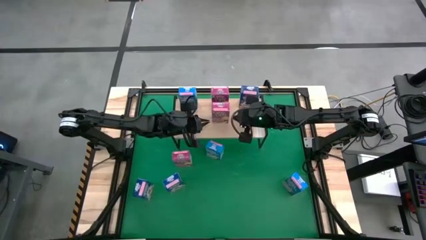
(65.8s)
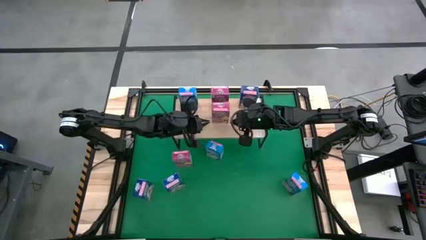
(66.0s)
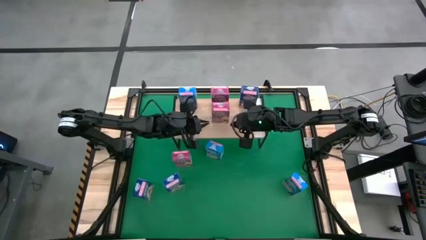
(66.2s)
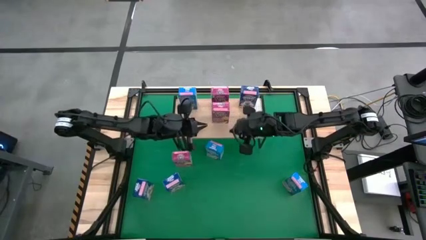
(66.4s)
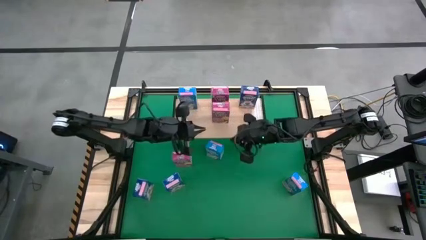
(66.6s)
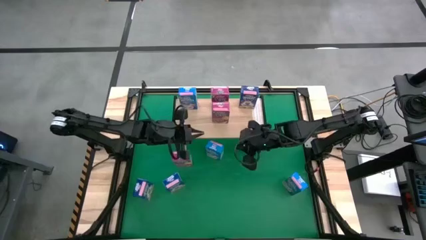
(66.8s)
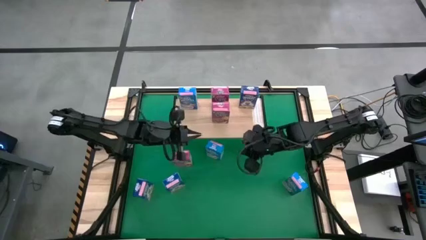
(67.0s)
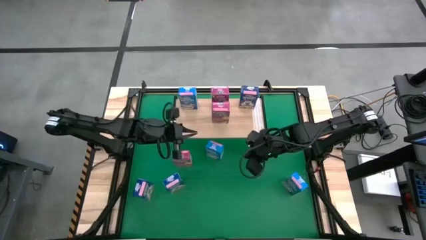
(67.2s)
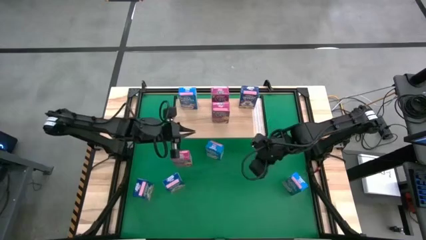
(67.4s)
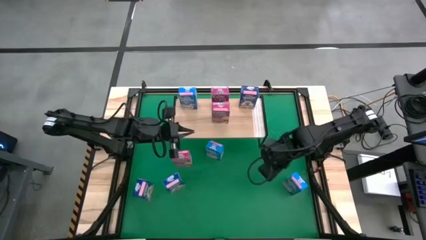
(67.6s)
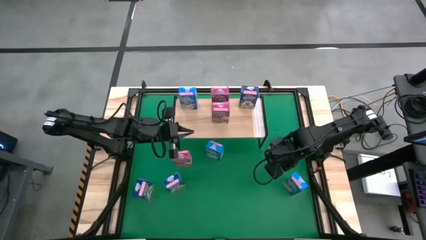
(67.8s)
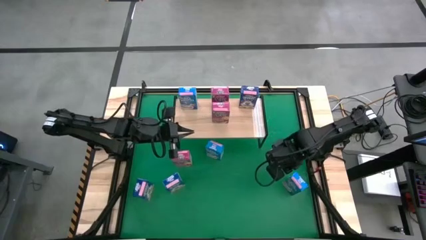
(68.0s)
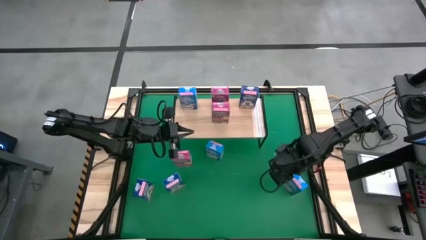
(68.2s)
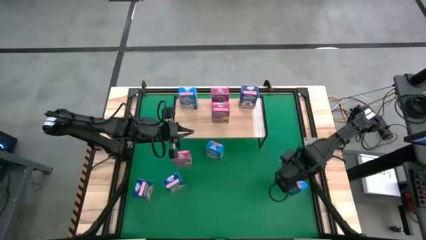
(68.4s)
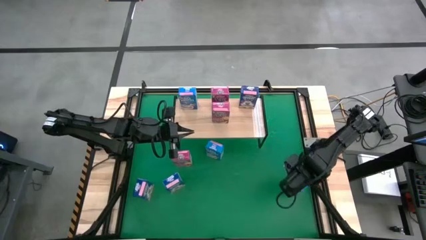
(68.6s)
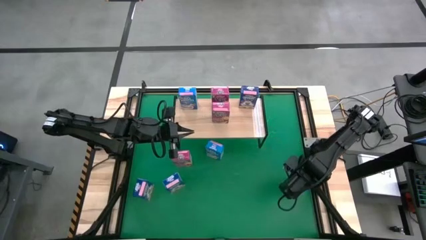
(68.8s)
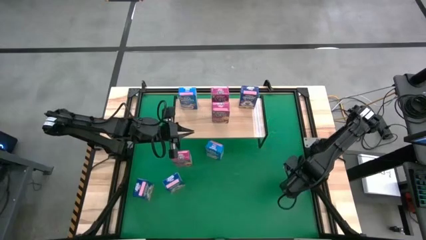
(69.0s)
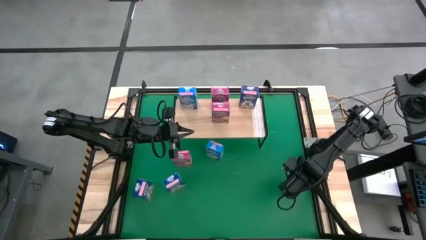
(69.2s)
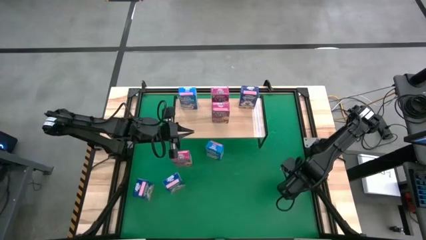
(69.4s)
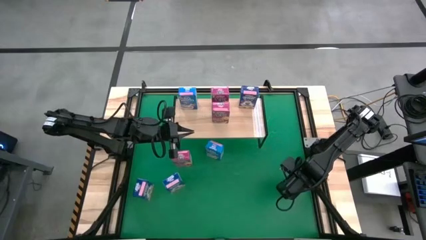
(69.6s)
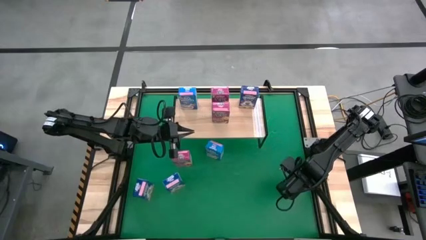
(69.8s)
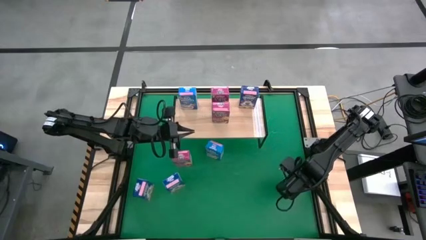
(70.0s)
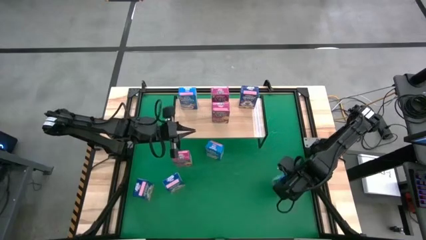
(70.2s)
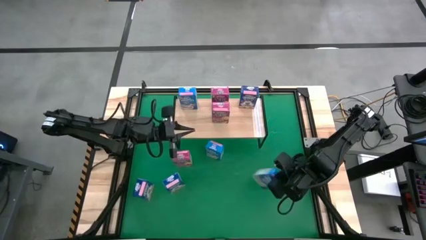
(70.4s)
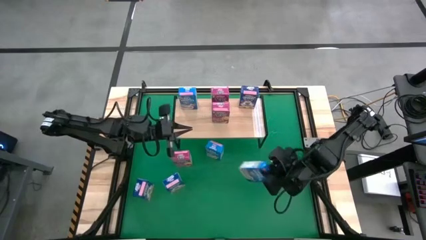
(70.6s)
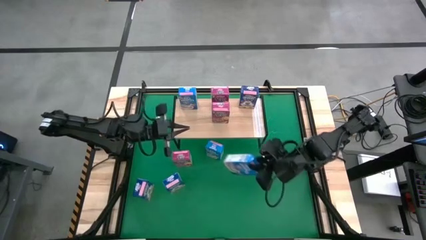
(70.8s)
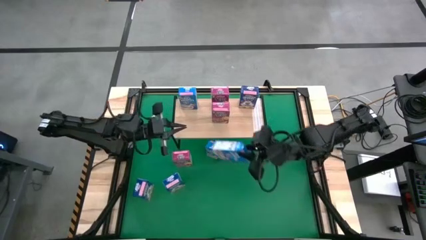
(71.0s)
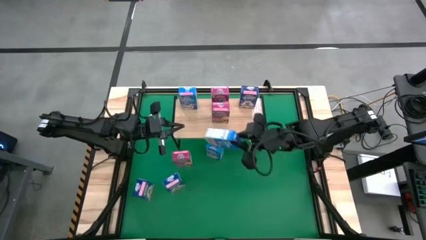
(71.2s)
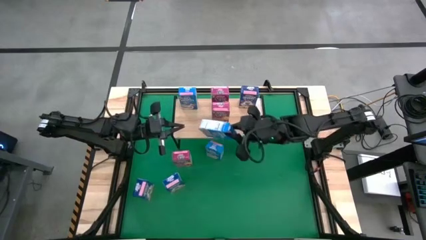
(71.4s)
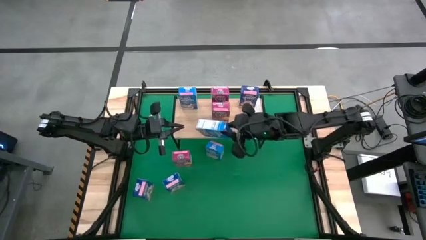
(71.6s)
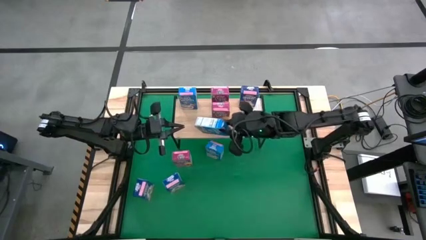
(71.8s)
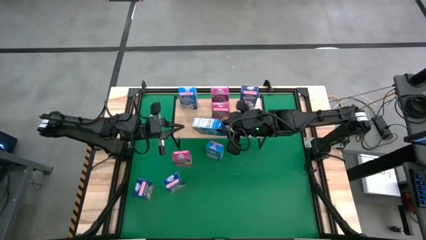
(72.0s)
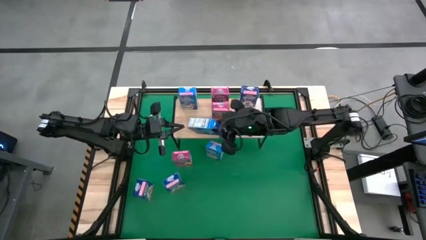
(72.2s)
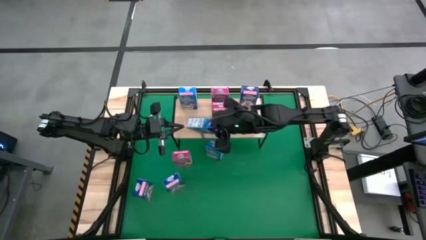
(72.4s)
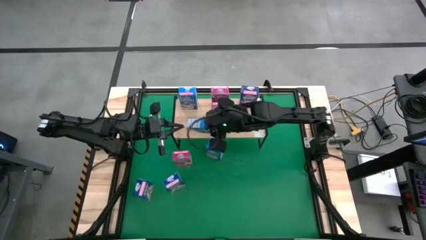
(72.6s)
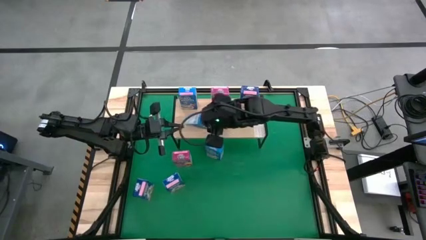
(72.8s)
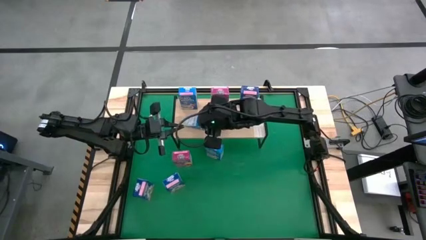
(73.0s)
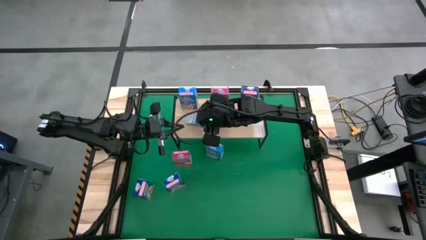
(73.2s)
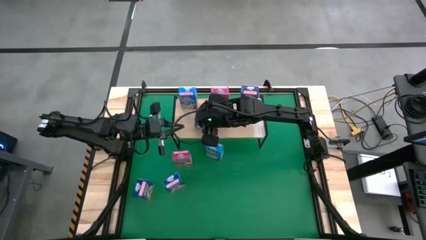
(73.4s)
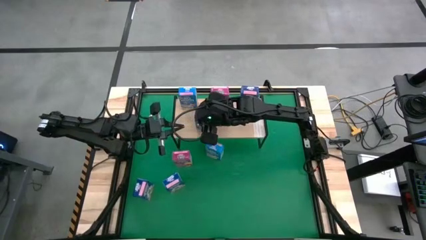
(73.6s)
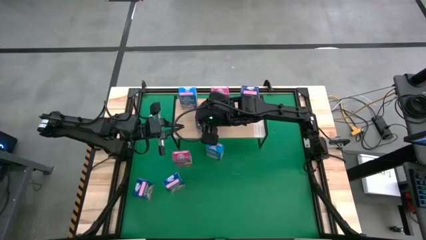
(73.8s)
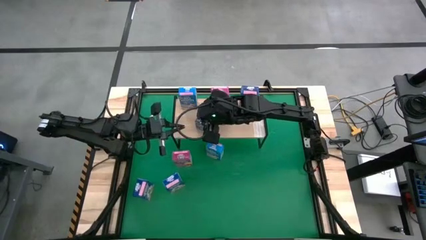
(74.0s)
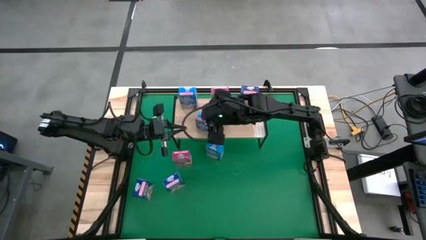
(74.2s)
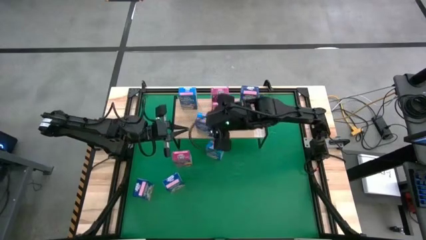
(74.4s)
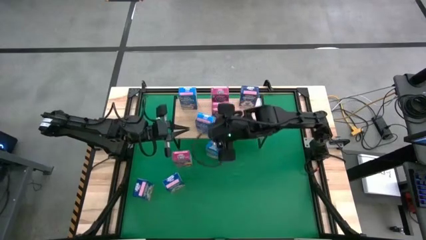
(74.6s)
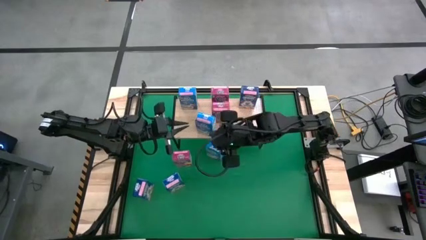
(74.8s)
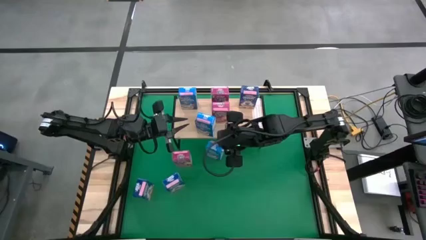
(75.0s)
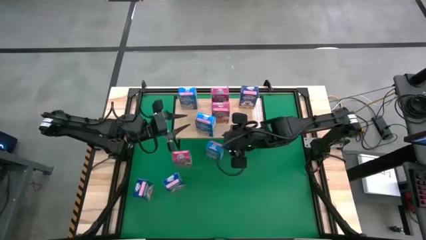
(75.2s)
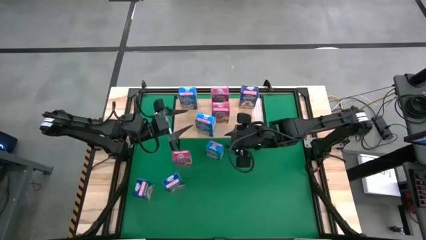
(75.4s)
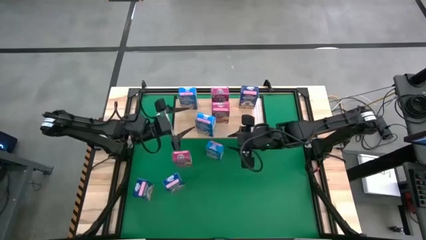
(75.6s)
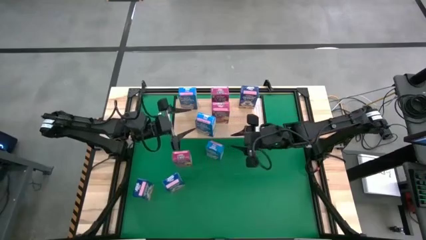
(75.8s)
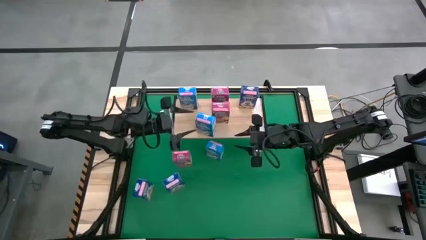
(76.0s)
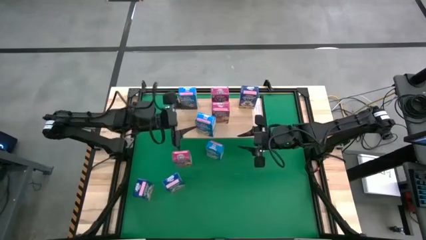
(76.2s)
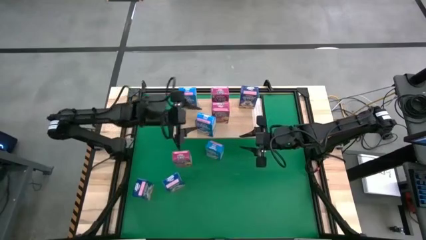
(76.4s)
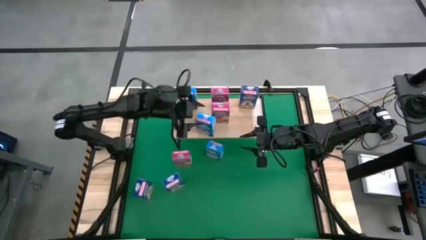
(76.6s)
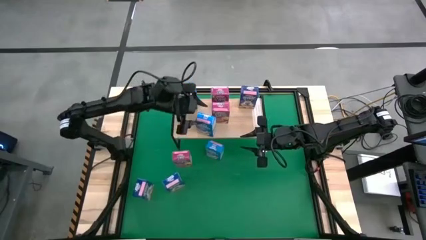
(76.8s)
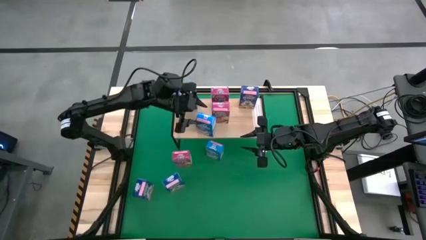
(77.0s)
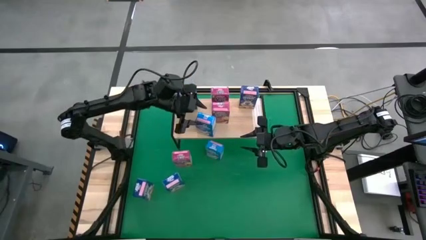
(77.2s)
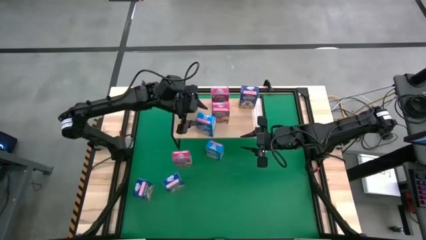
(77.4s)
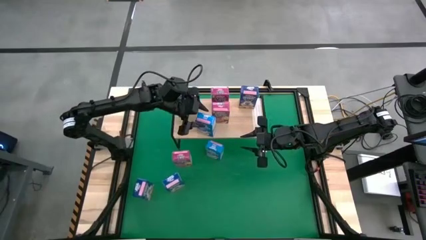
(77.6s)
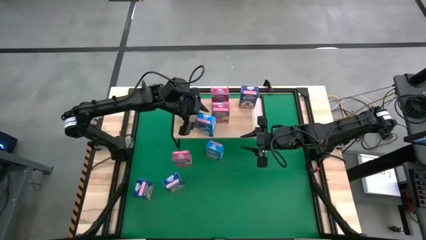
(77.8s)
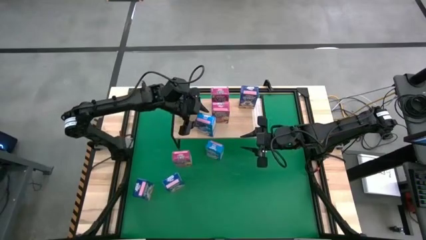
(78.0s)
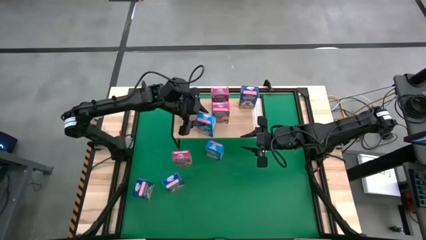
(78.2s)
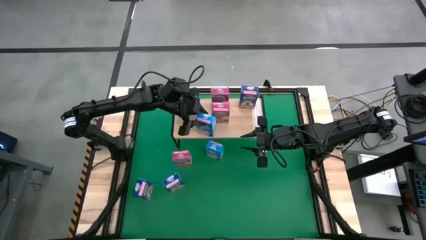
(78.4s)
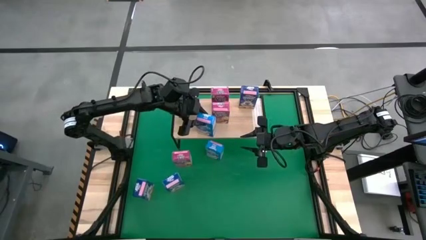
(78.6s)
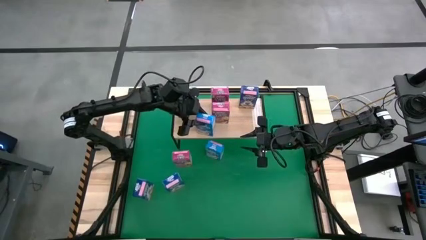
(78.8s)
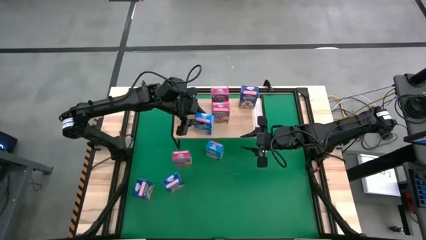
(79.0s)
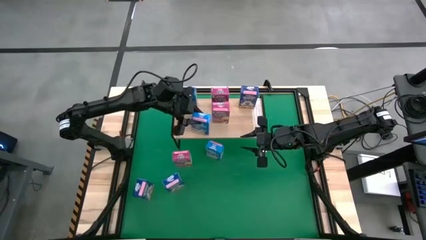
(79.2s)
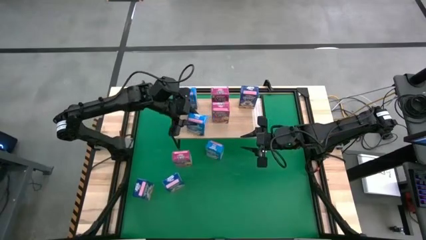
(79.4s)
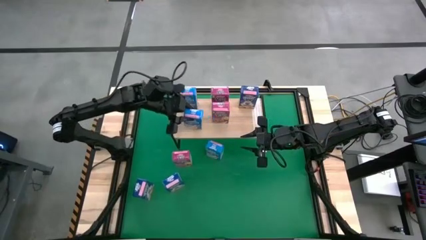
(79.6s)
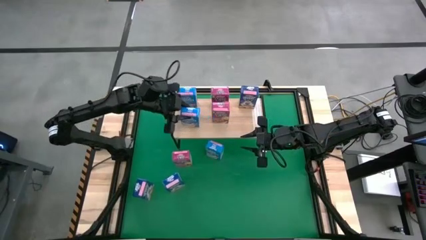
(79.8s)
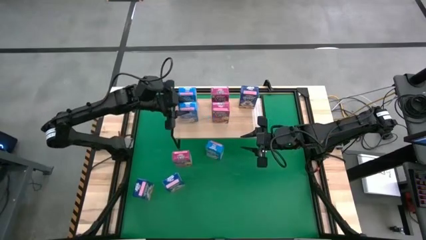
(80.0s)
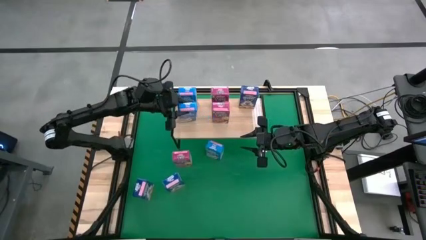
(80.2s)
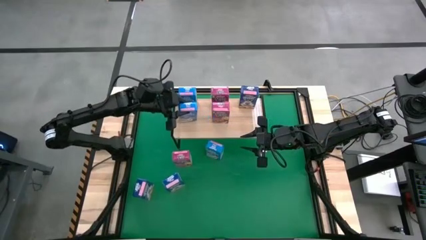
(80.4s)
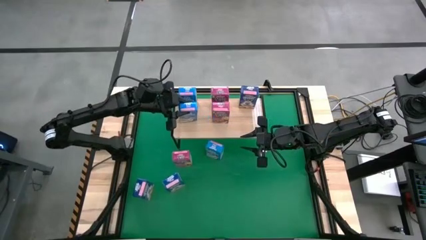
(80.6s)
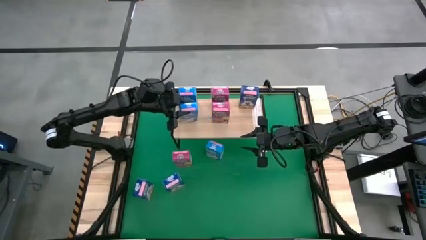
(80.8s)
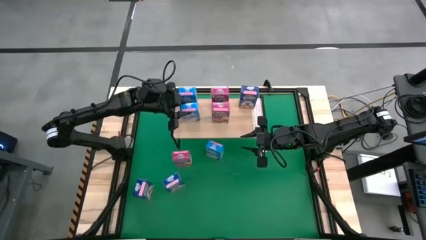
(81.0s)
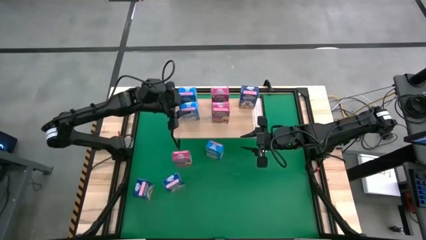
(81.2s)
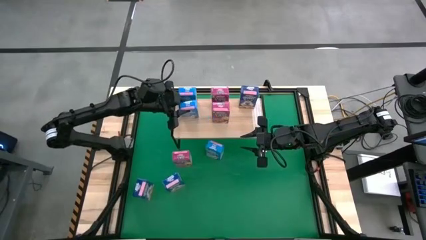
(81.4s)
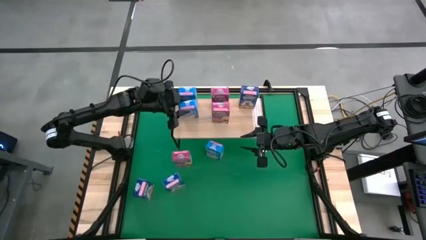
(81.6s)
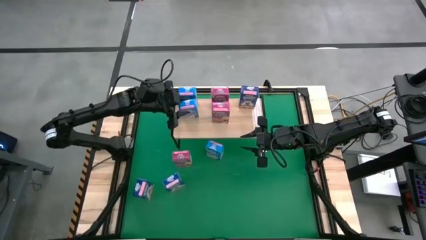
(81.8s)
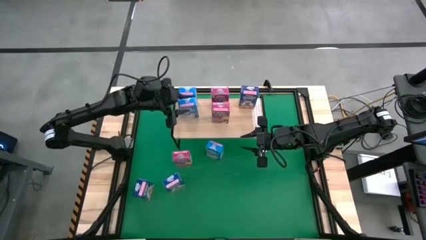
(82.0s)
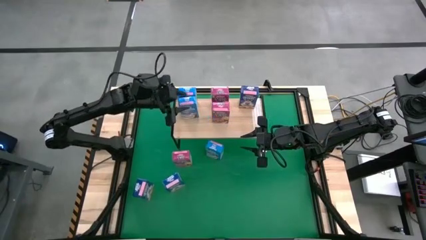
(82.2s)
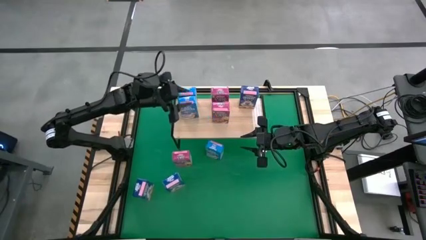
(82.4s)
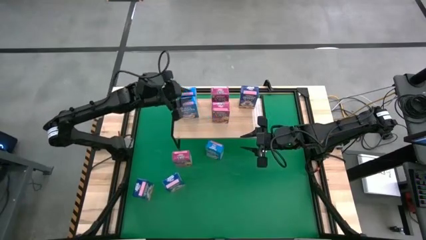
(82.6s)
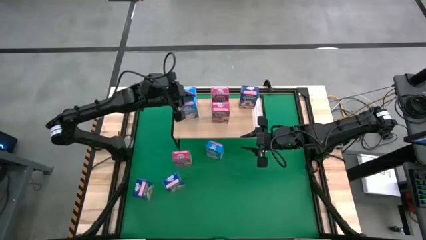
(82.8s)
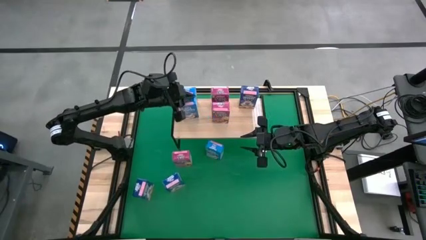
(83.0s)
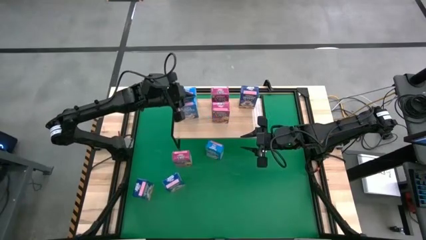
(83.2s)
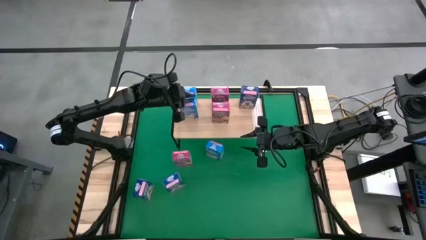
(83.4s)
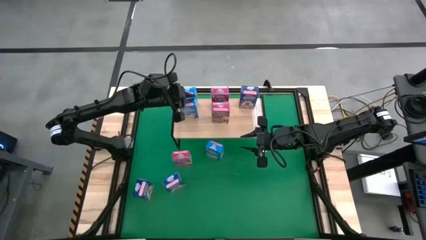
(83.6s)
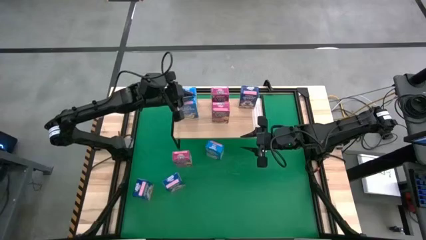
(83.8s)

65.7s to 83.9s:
Task: Stack cereal on shelf
Put the right light blue cereal box, aligned with the other light blue cereal box on the shelf
